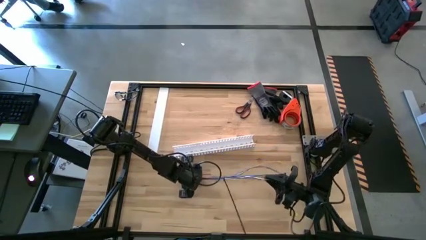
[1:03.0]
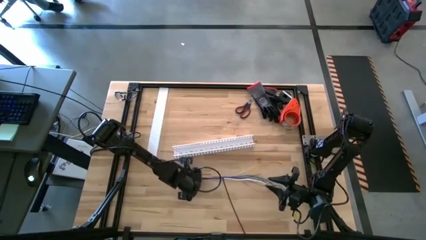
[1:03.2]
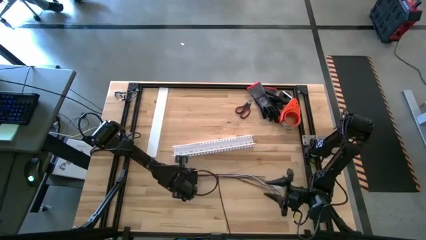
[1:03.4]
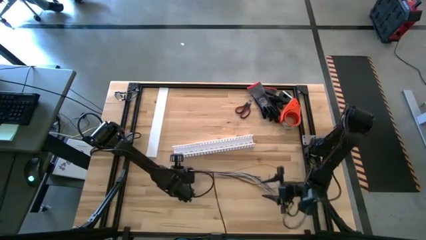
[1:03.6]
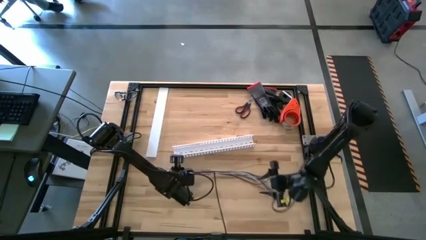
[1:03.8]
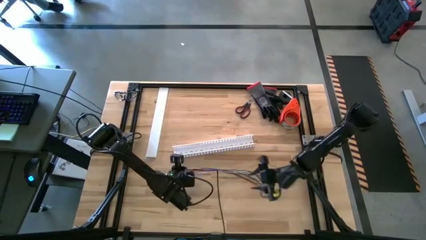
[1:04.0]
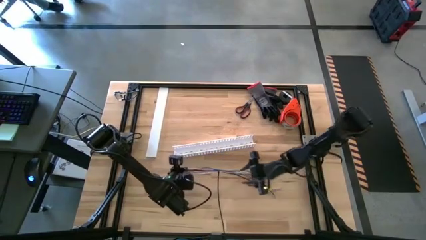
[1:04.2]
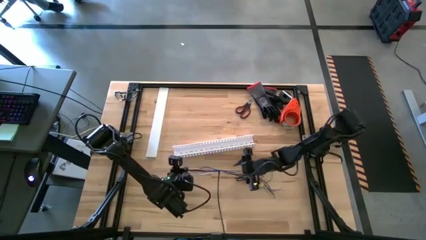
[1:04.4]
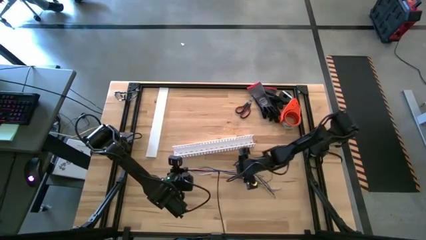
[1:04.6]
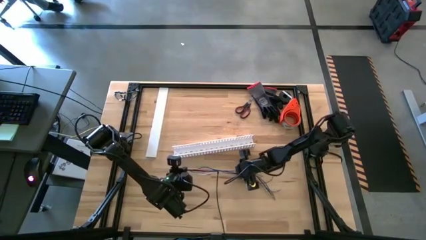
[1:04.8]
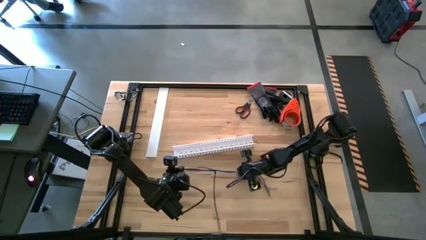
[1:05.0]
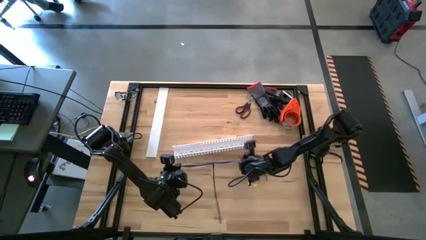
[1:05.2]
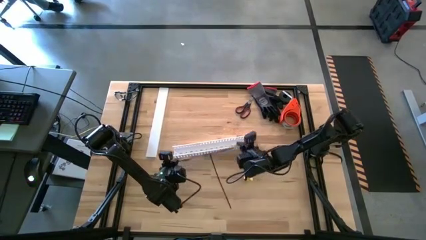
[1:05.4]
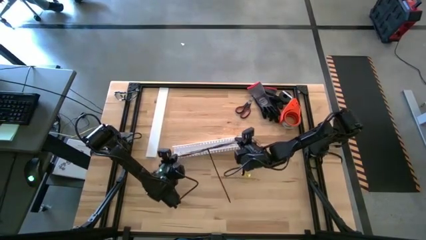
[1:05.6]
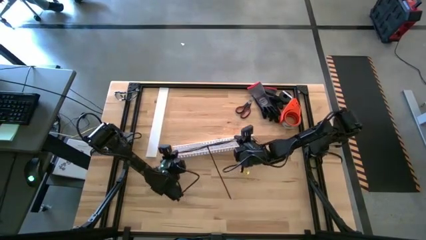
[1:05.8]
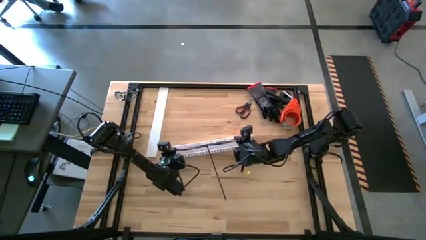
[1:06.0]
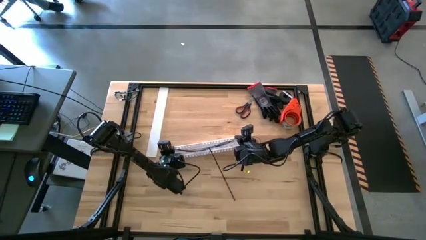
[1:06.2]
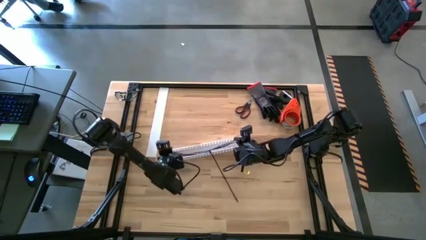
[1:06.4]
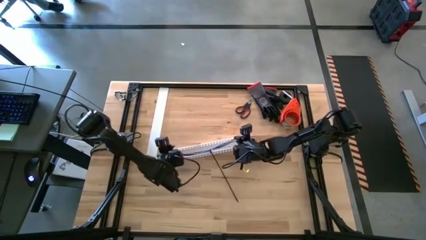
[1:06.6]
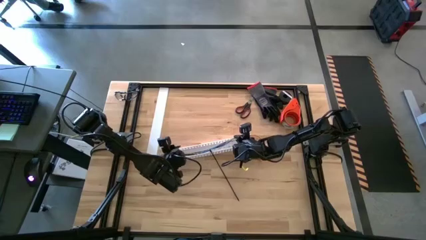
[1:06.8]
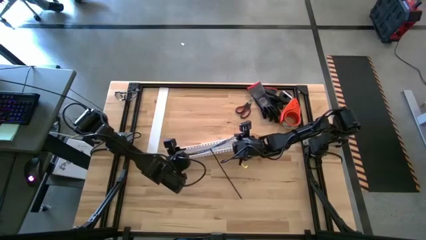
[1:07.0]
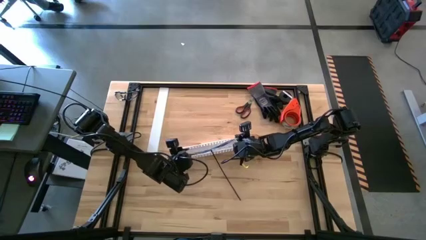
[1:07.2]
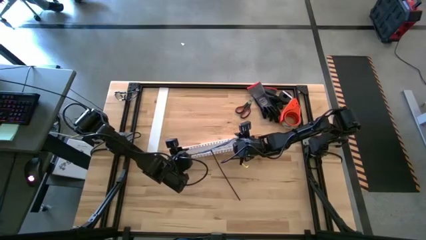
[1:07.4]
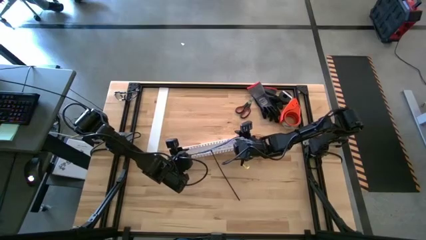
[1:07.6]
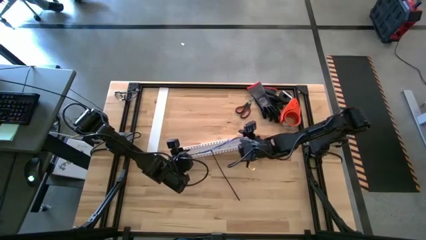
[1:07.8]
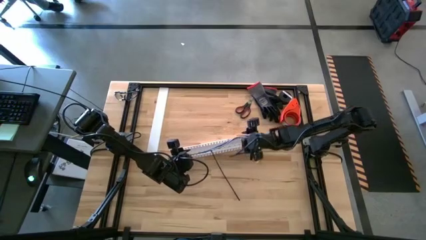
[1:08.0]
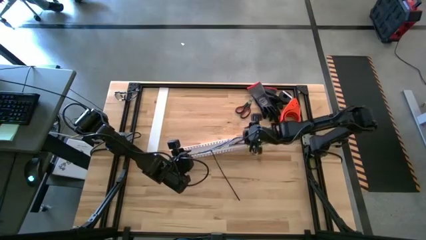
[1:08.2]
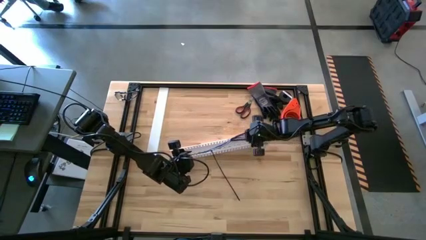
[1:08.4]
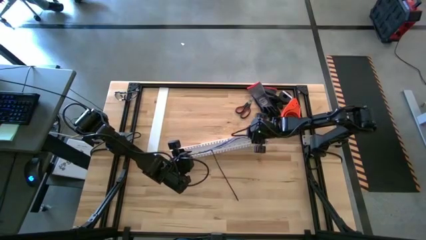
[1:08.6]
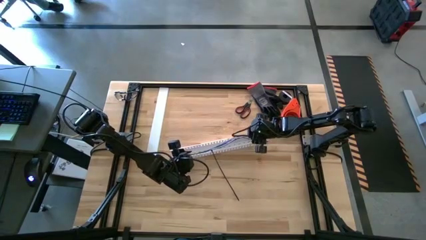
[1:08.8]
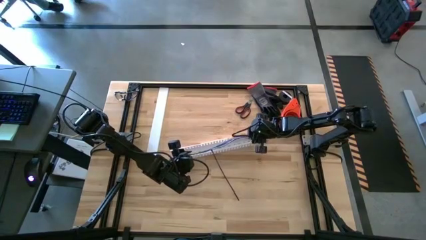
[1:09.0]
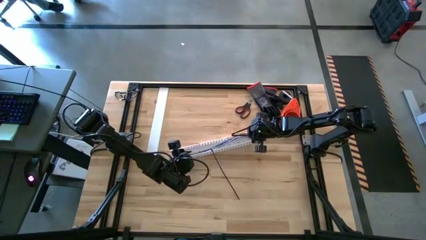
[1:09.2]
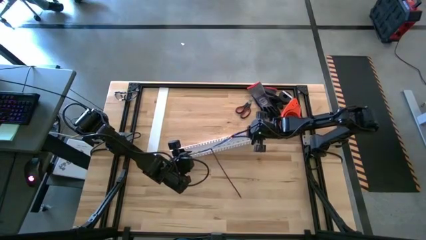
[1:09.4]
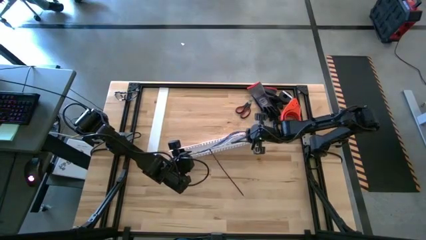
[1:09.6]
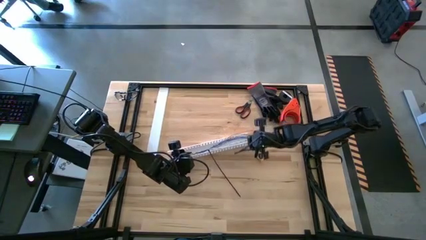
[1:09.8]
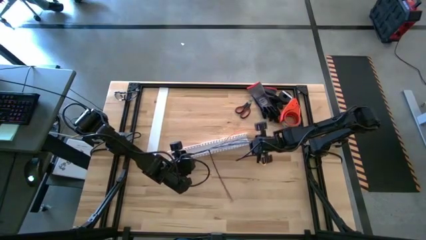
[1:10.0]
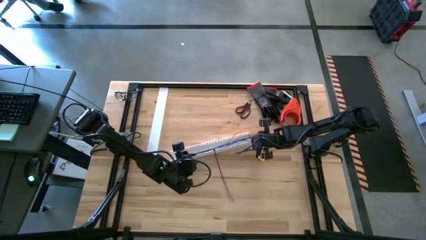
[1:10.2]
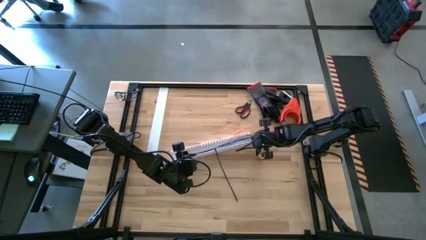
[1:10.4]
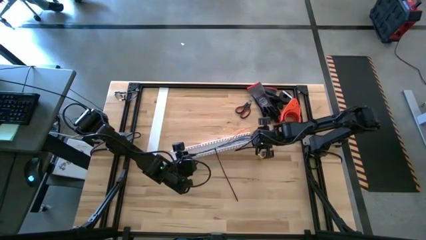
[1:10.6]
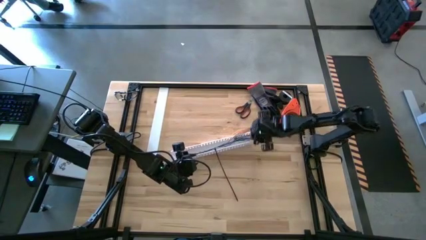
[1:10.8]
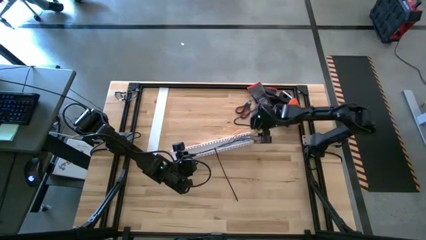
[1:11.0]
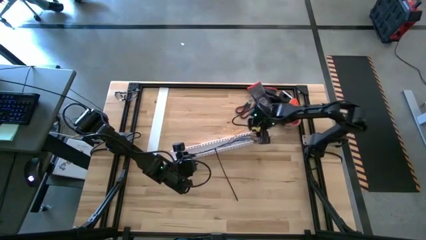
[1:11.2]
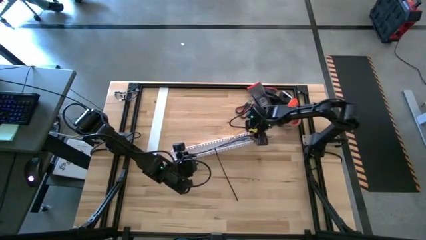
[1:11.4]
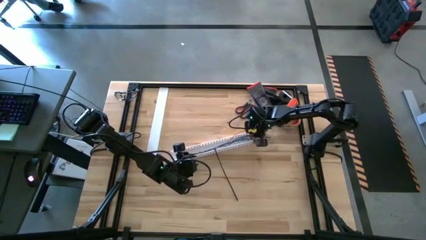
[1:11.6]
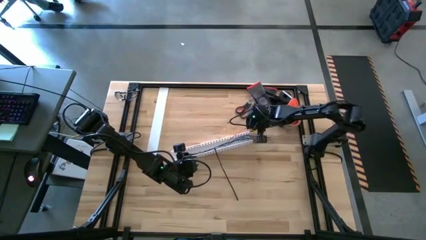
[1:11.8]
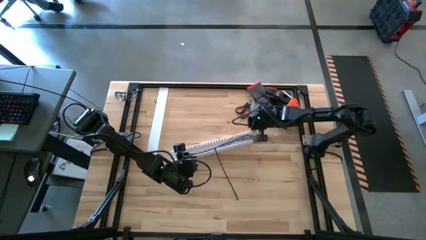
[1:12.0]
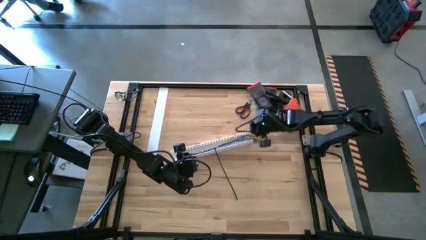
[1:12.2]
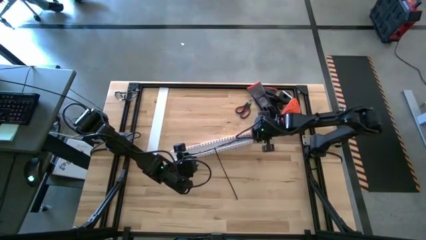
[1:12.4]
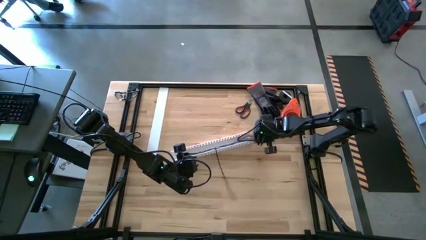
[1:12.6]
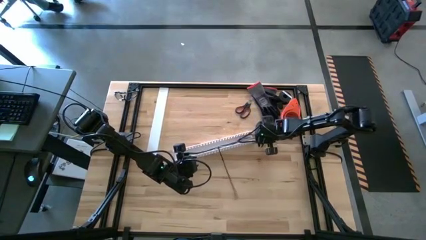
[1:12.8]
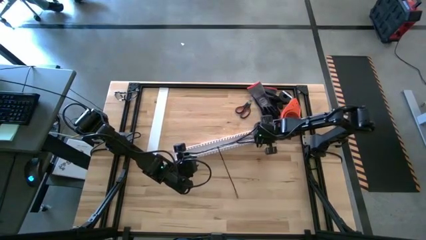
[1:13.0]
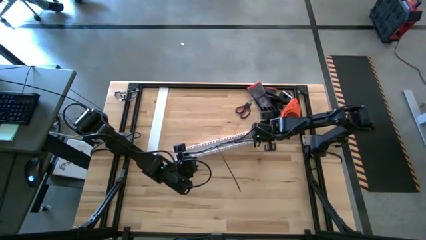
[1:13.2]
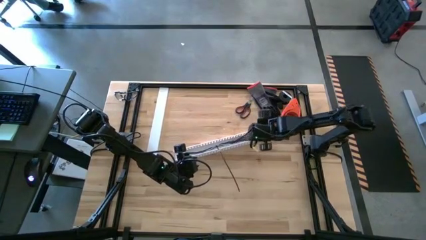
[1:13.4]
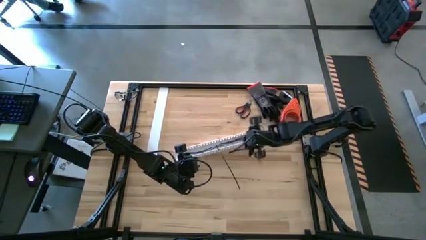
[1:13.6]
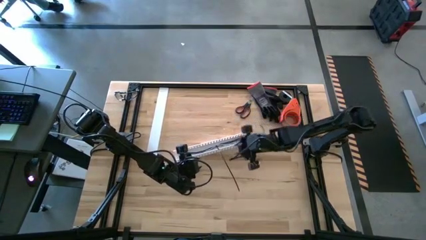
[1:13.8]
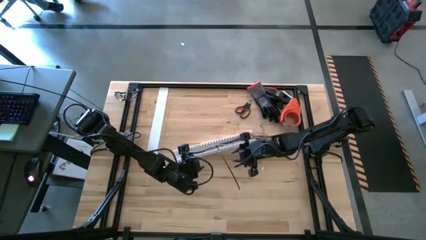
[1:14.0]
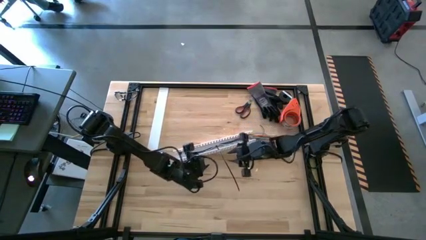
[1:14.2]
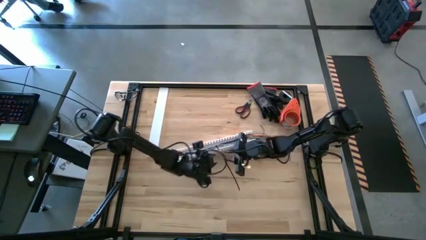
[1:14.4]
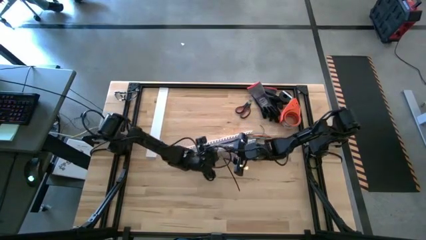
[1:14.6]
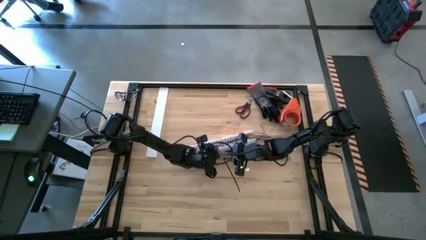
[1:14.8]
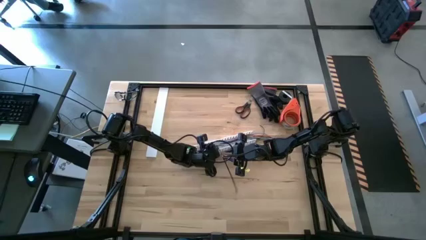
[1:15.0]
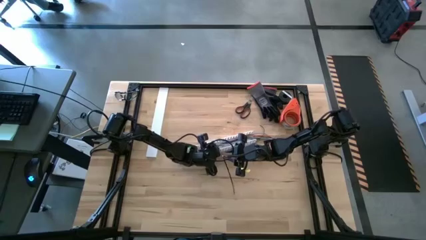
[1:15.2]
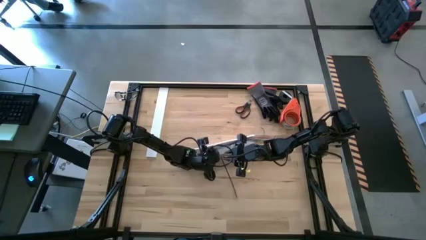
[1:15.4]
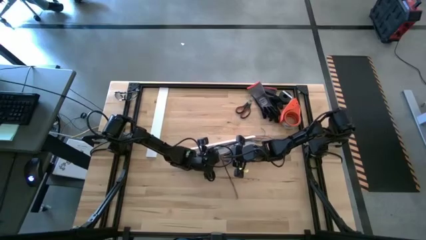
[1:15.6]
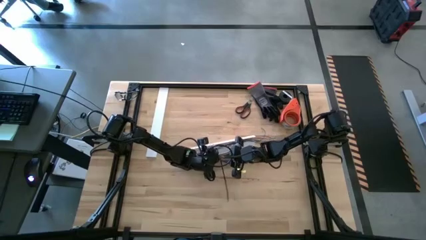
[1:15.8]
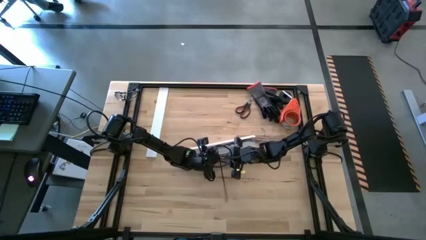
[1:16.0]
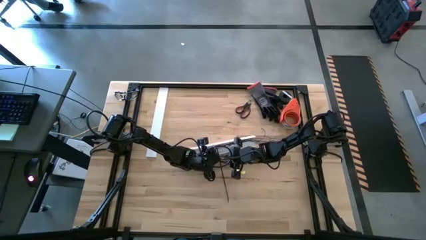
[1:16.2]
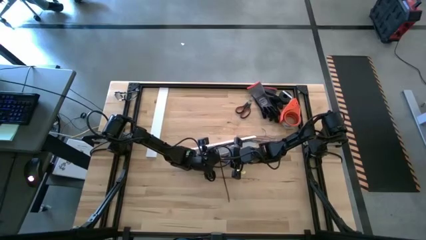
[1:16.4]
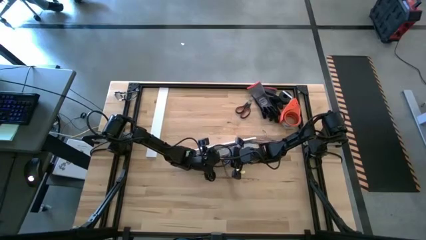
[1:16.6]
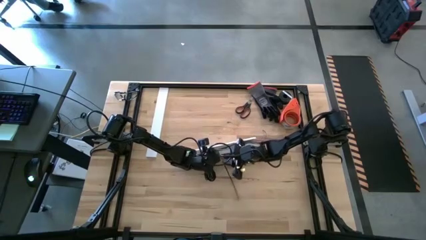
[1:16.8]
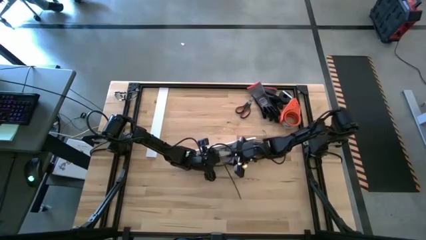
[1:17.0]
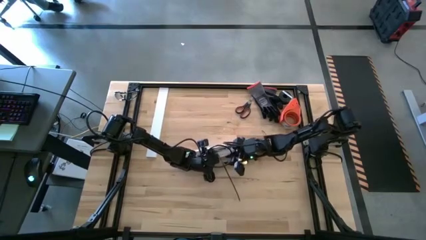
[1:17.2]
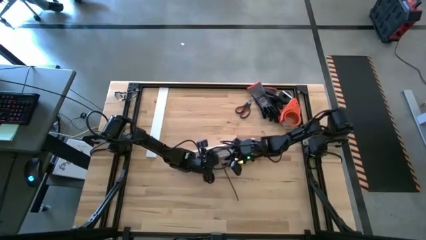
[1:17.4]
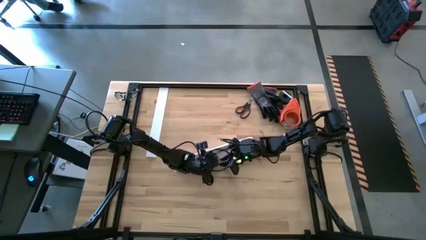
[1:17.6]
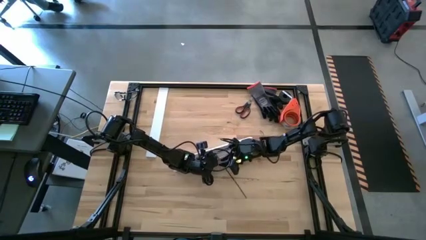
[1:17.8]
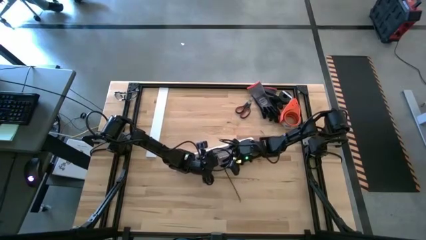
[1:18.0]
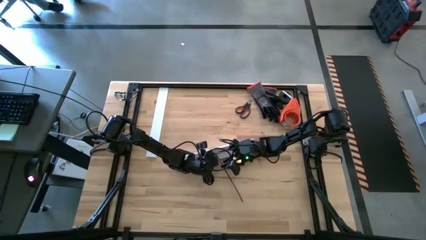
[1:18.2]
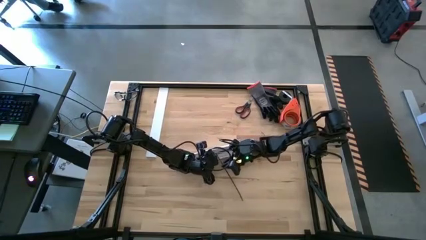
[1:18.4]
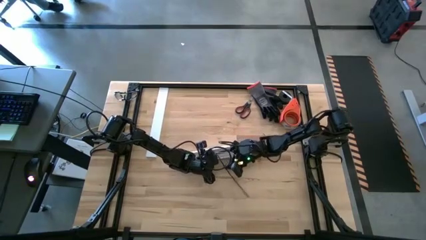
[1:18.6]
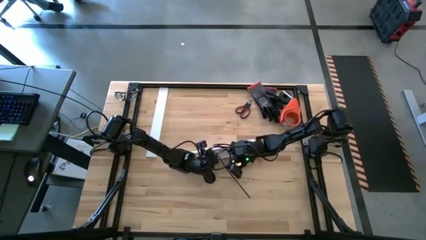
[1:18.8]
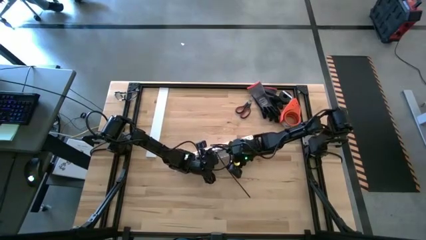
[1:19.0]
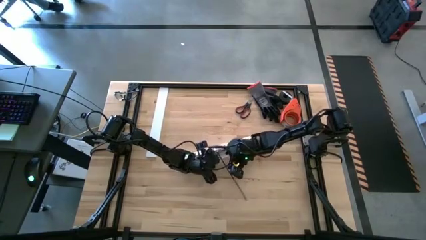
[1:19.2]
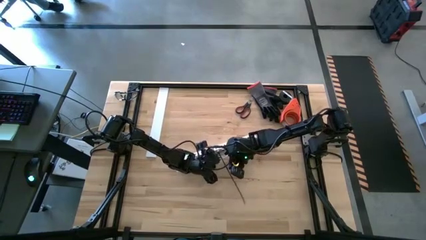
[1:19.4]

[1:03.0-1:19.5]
Task: Ziptie cables
Put the ziptied cable wires into the white cable duct

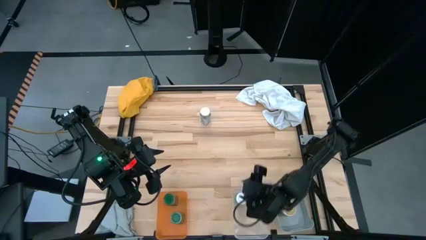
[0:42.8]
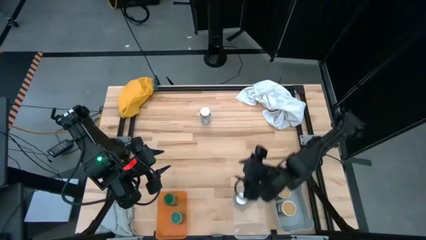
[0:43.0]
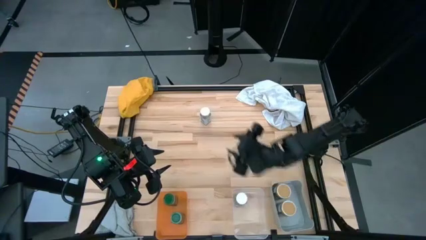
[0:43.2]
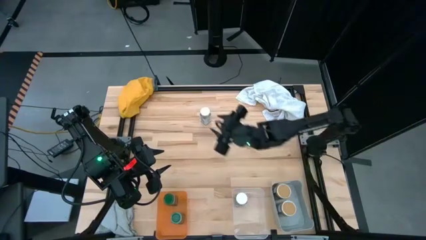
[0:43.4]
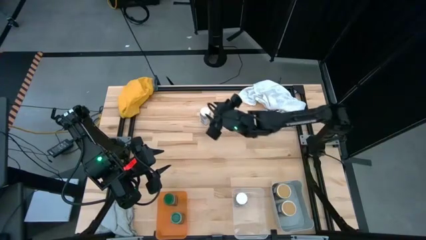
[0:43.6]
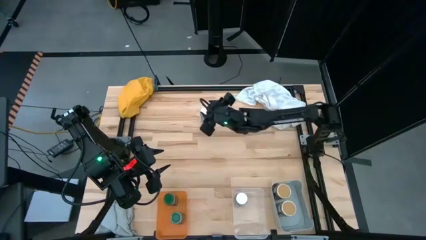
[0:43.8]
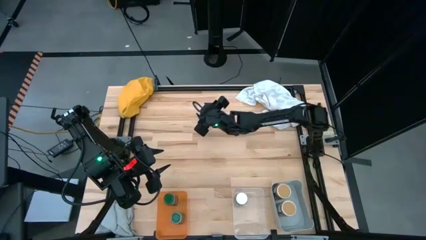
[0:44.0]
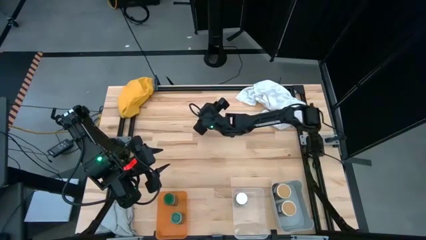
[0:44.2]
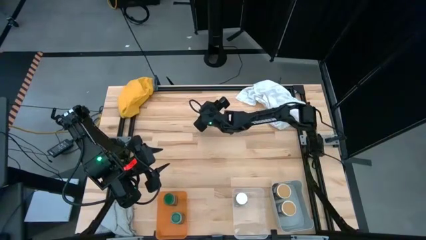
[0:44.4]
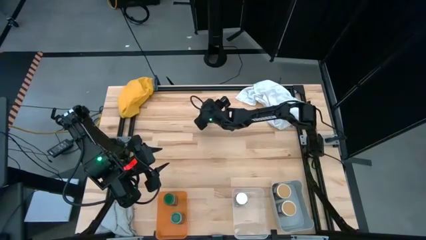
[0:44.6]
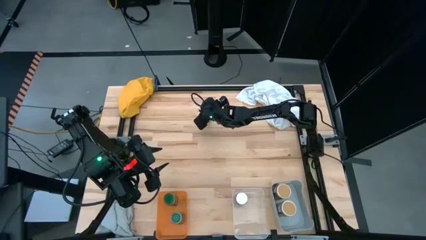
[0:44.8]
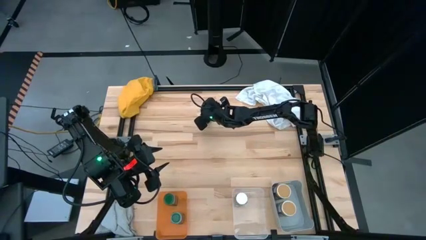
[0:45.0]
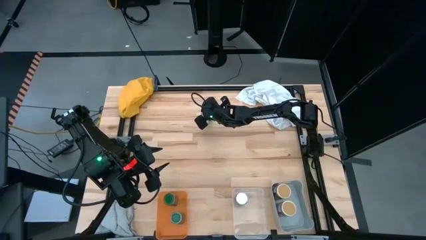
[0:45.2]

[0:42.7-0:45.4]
Task: Sort spices by type
Put the white spice bottle into the transparent bin
